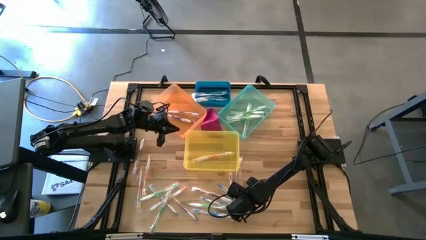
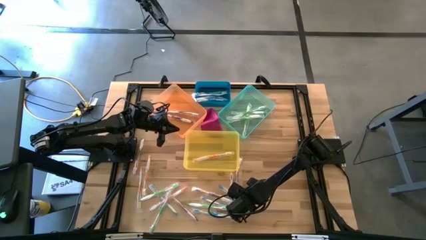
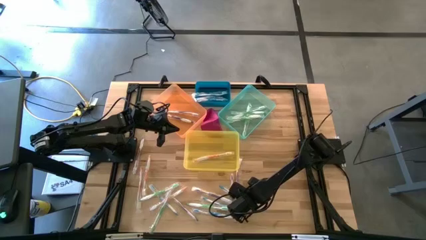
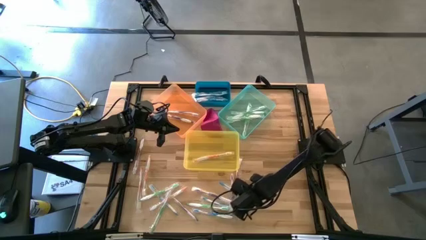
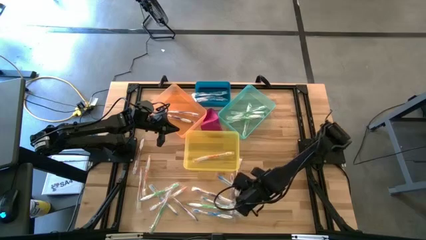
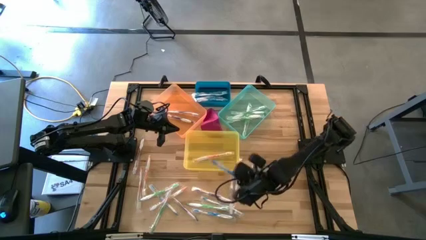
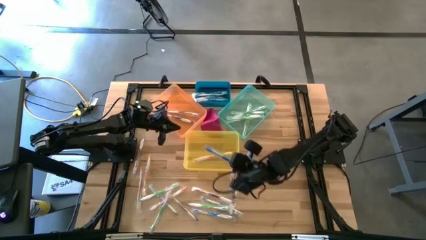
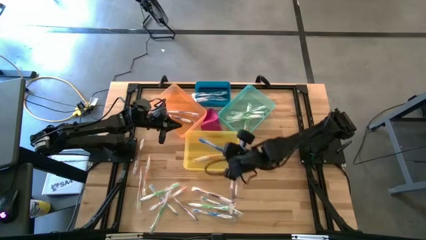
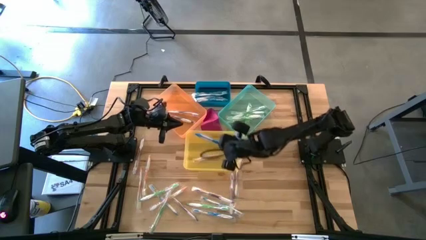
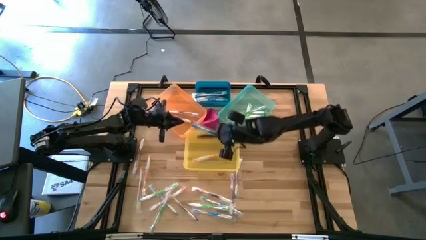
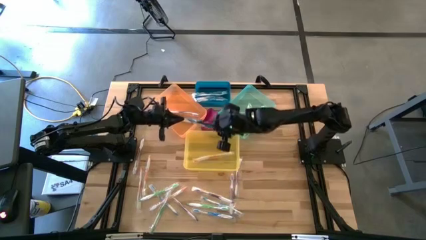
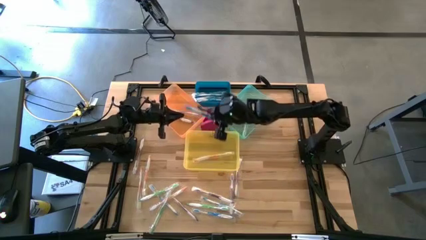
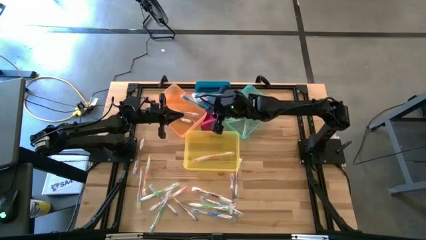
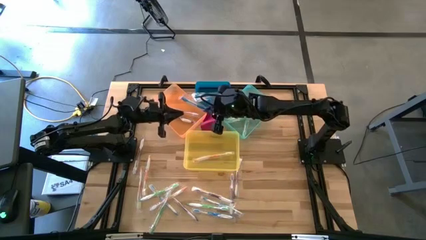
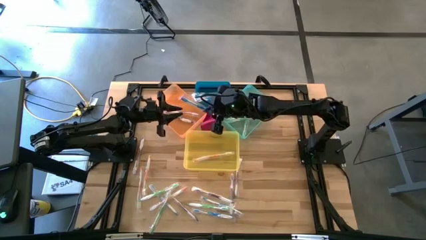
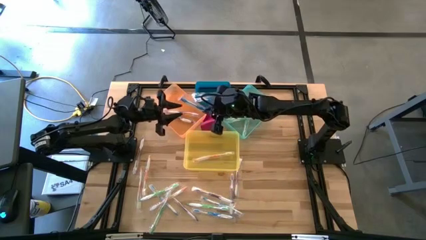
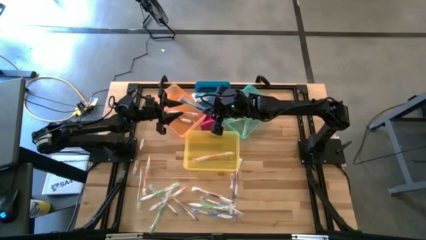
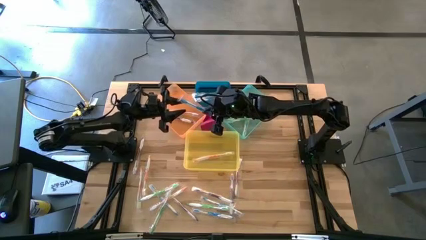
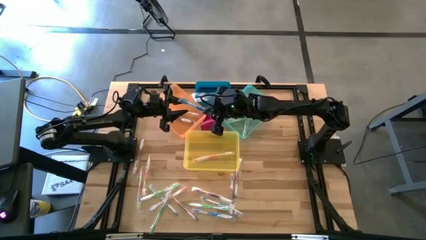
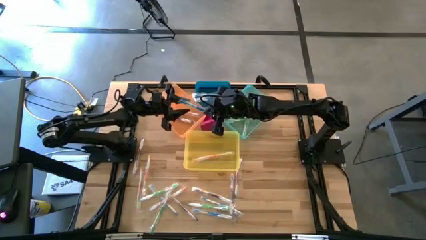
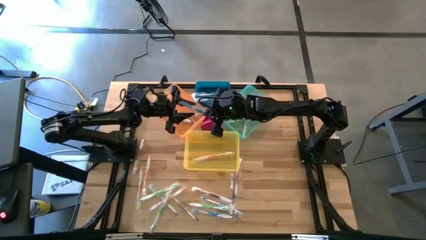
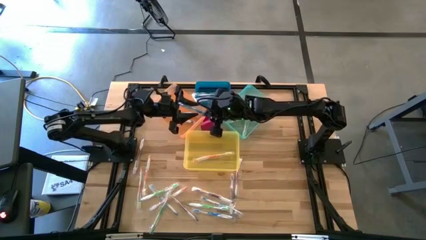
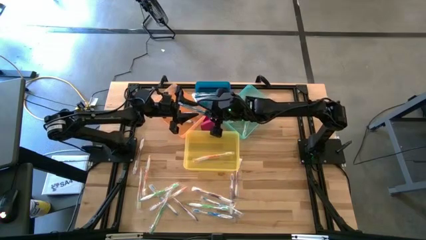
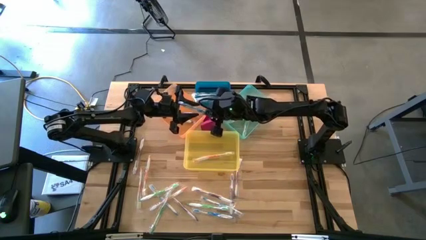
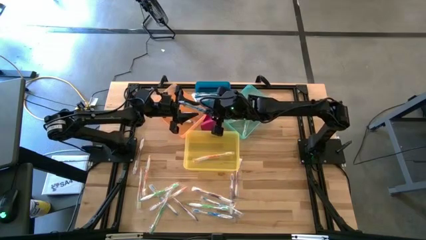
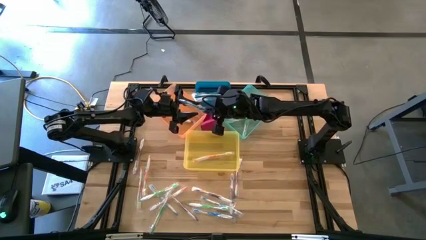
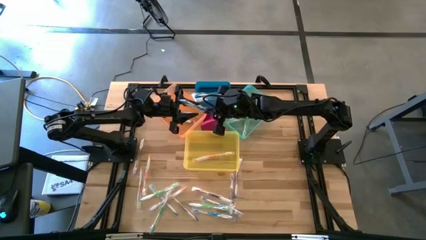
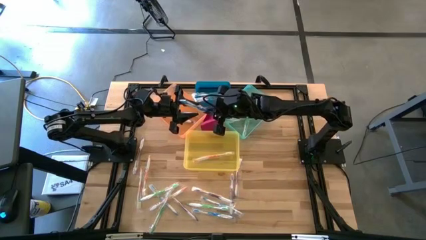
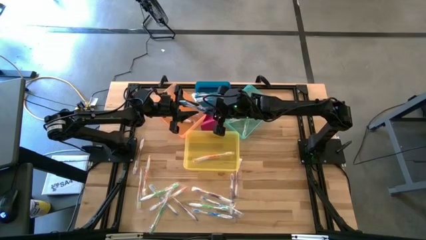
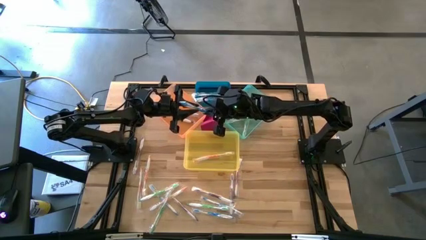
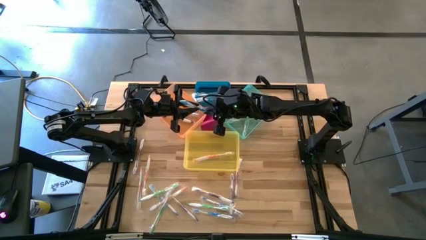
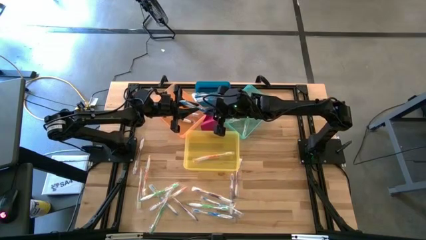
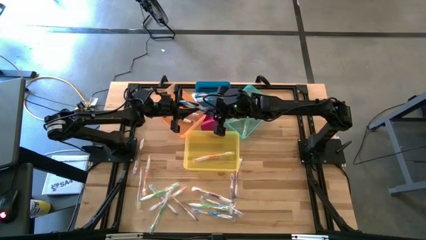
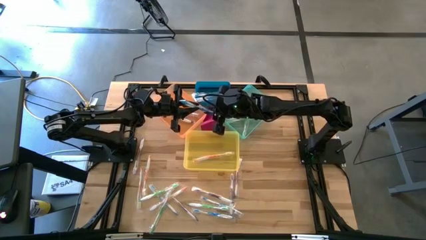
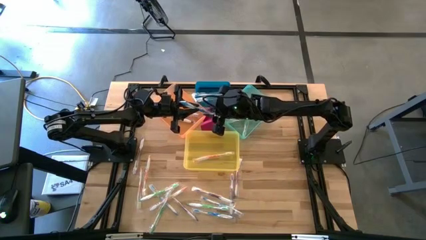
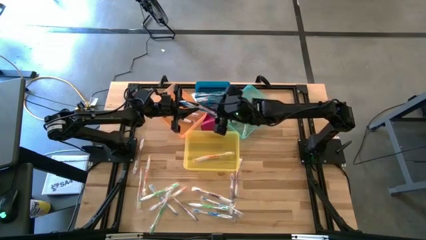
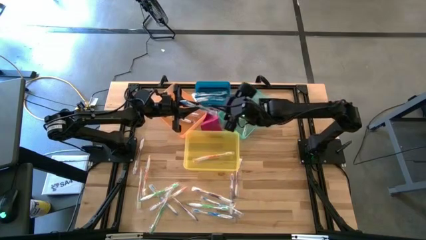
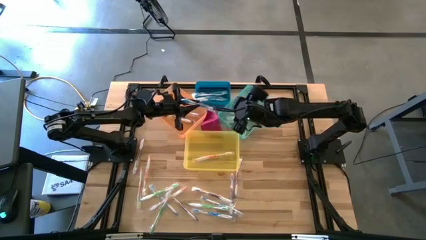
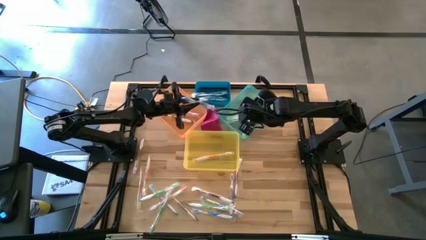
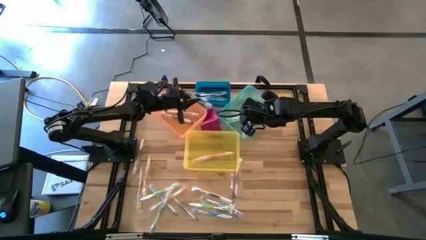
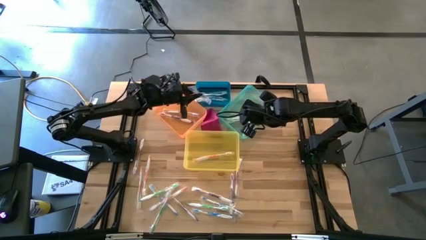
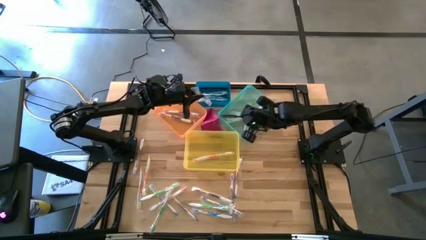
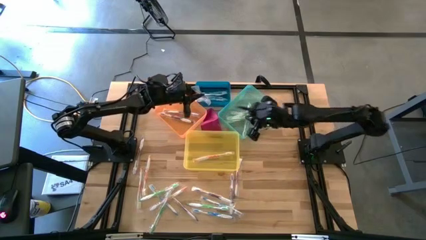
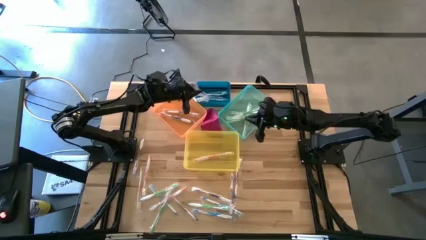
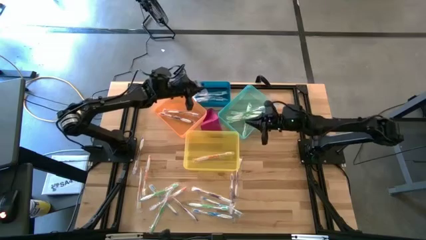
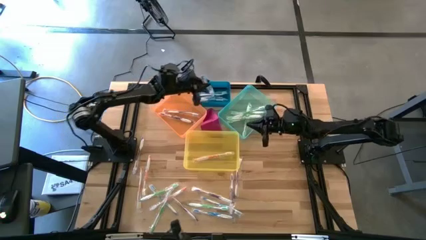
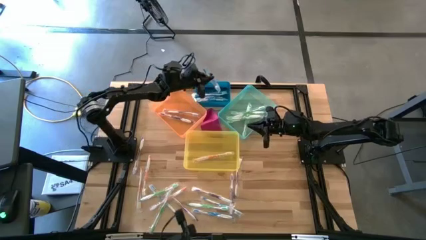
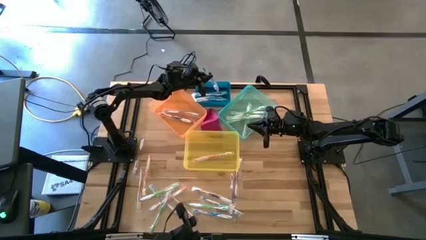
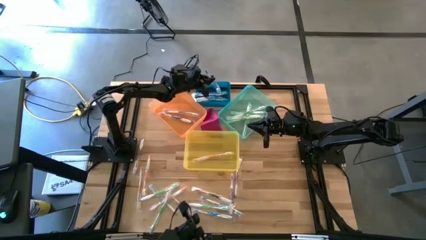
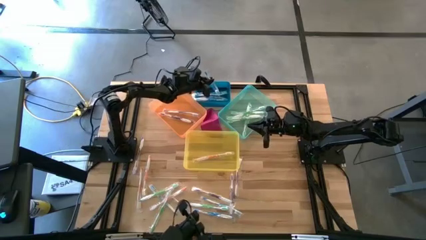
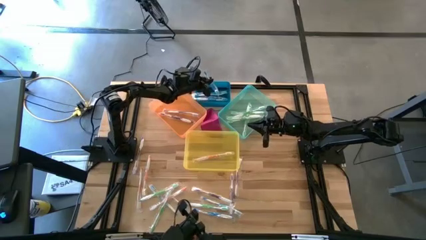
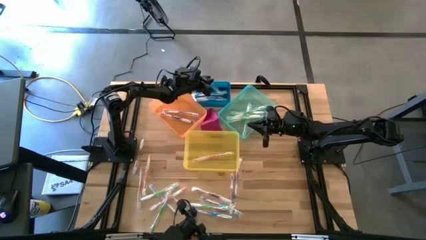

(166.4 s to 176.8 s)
Task: Pick & Place Toothbrushes
Put the blue toothbrush into the blue bin

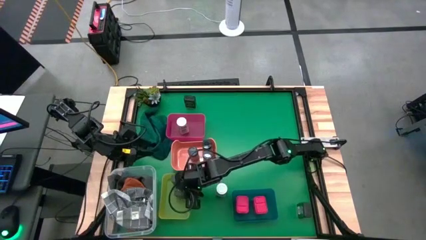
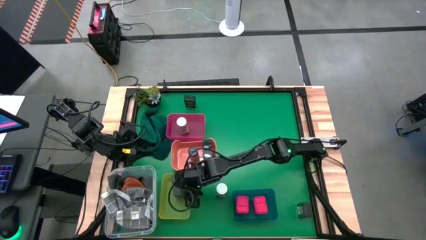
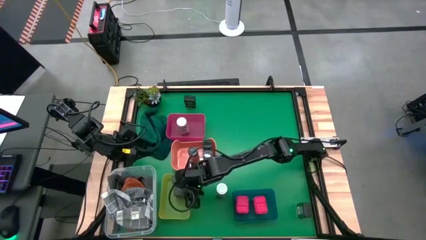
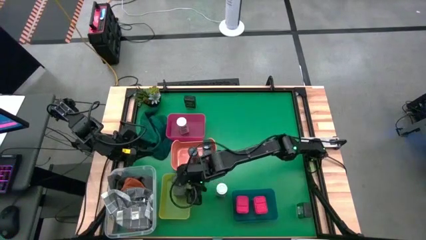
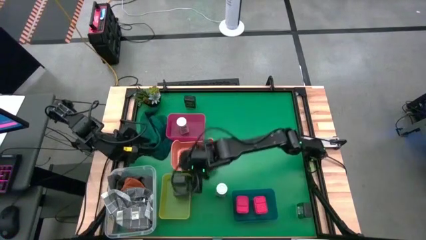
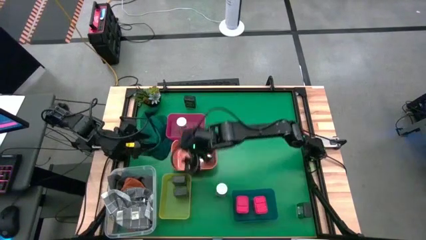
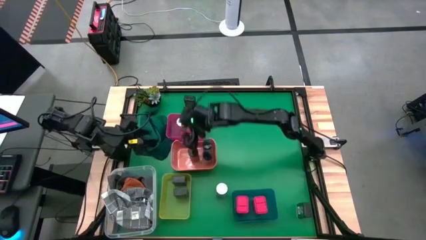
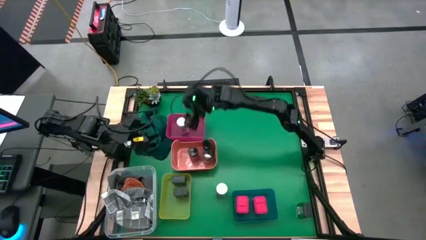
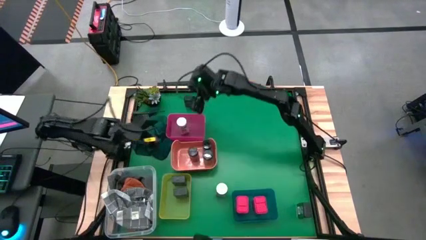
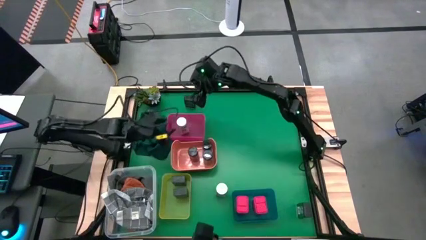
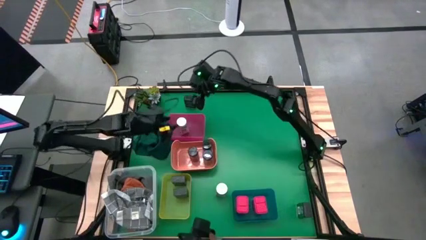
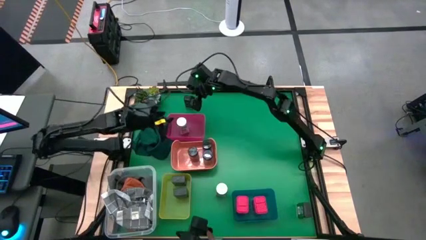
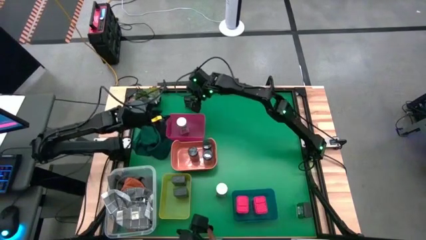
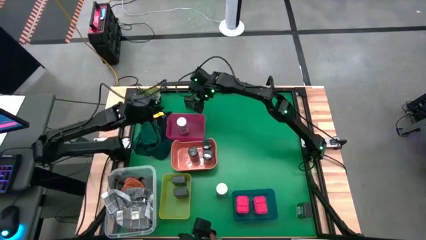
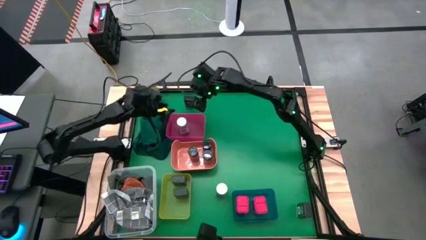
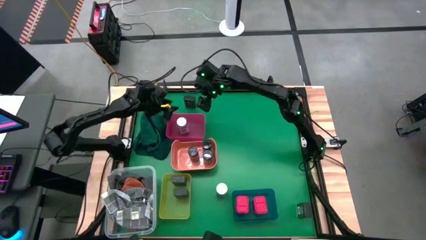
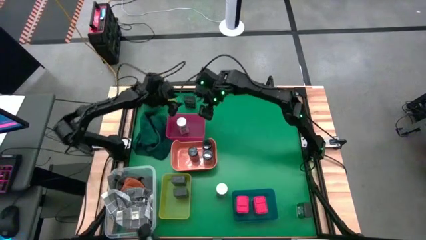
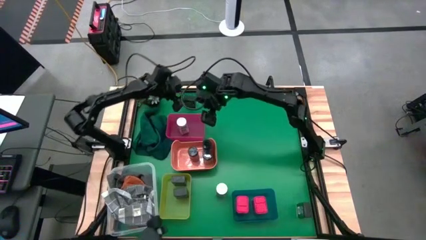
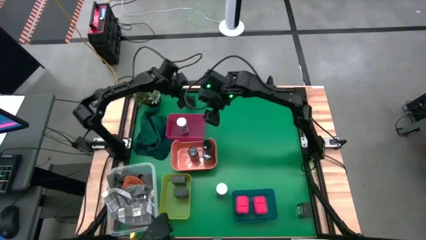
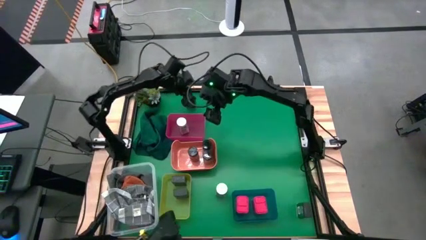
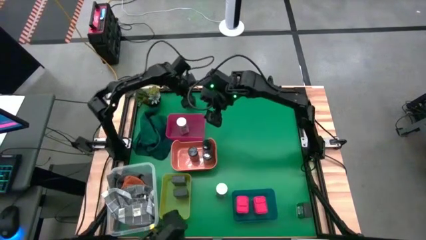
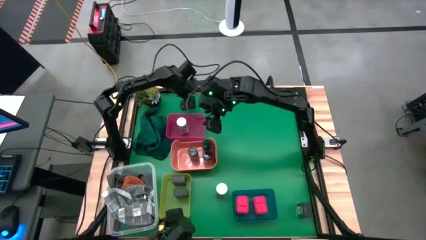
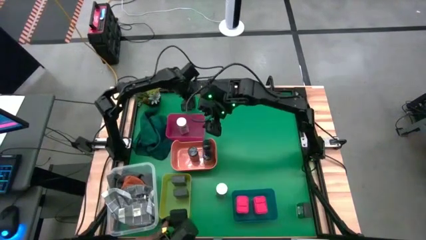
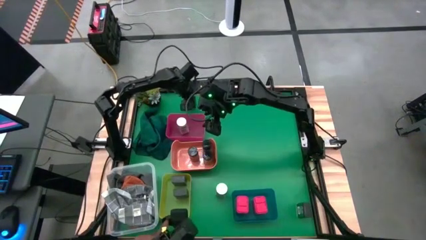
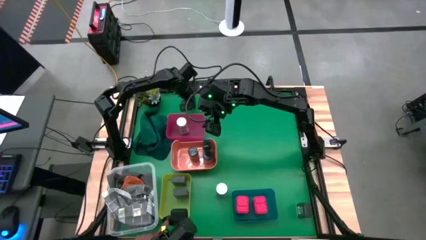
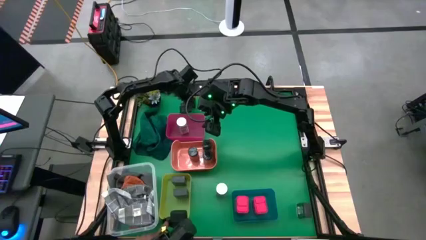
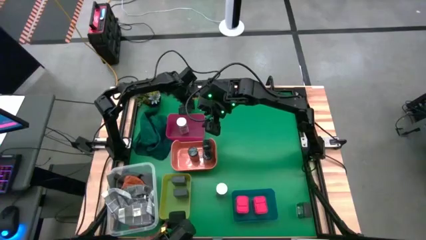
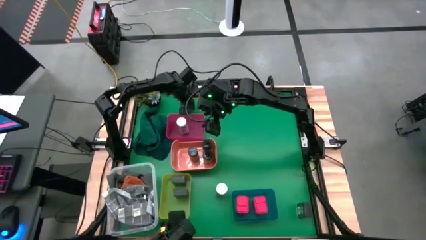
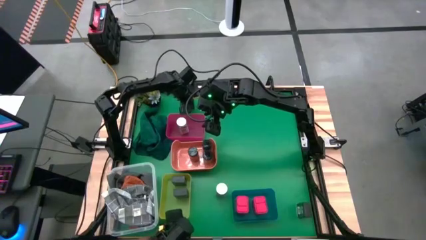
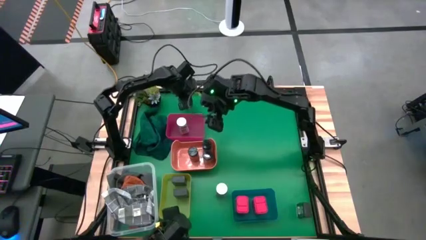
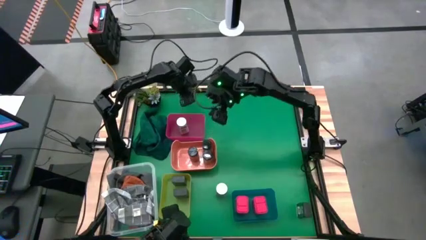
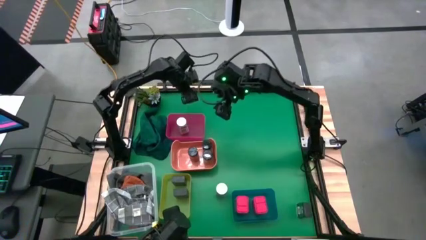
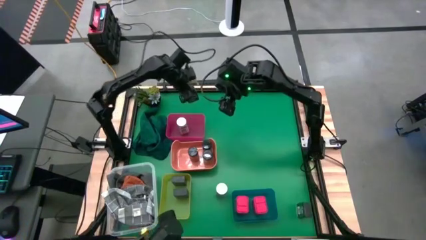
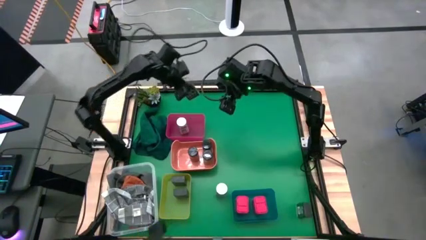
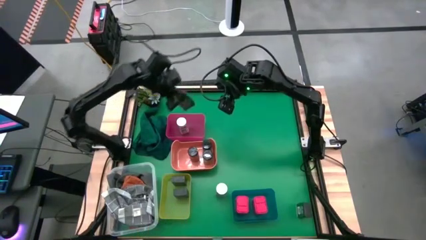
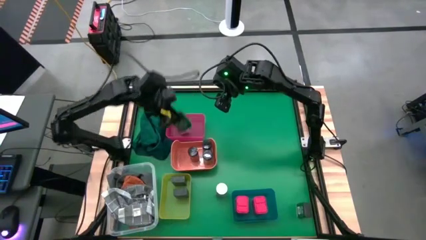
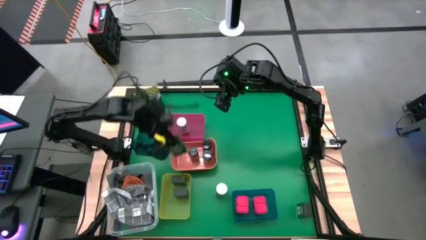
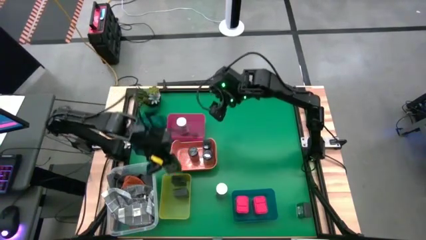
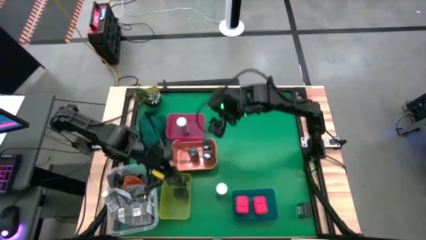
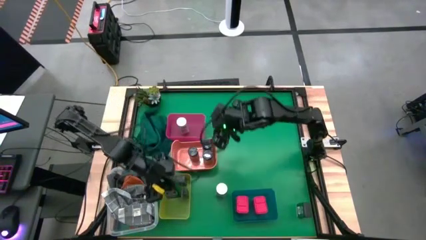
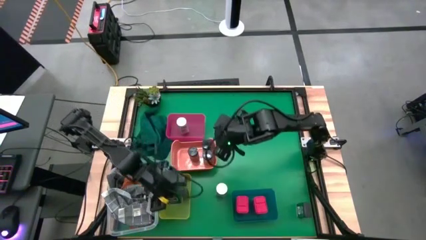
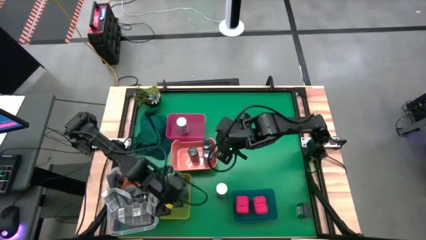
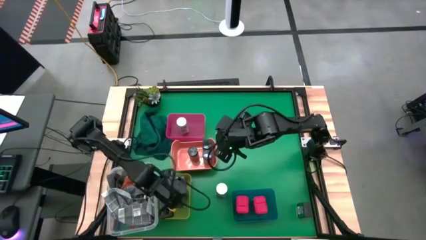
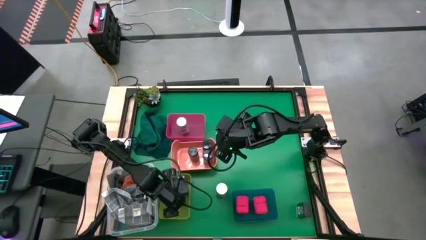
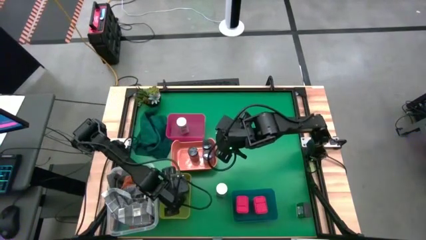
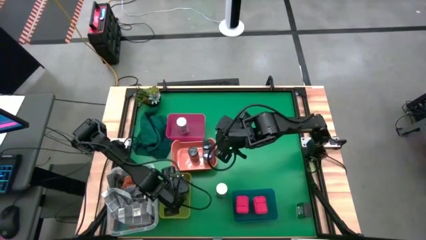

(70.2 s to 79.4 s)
Task: Sort spices by type
Put the top green seasoning can into the yellow bin
